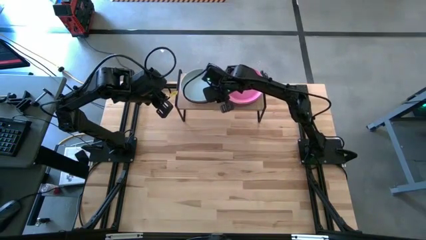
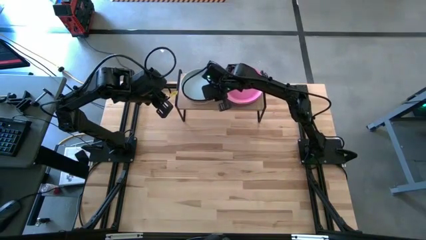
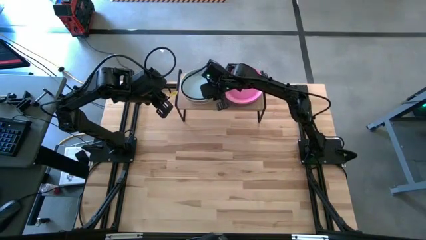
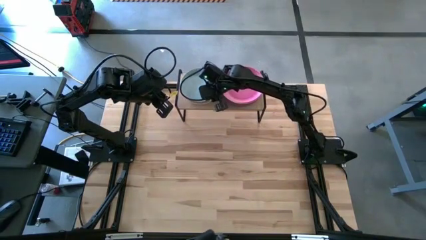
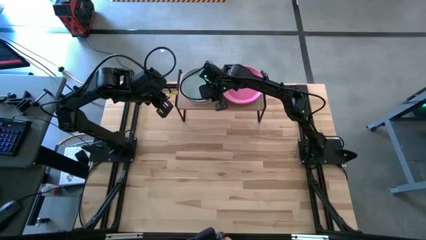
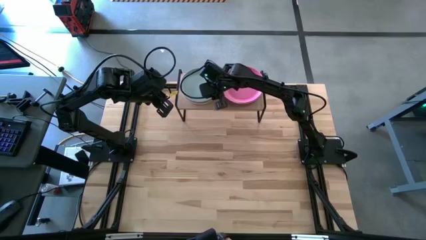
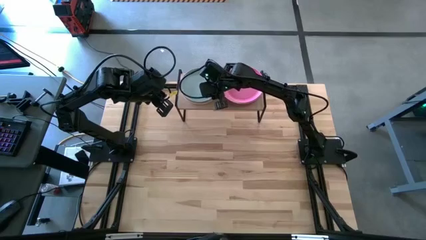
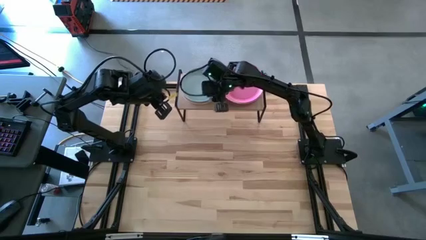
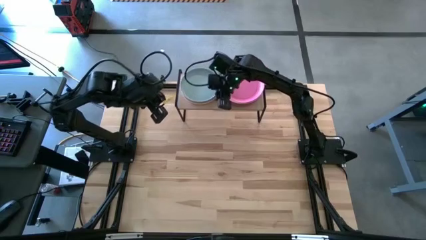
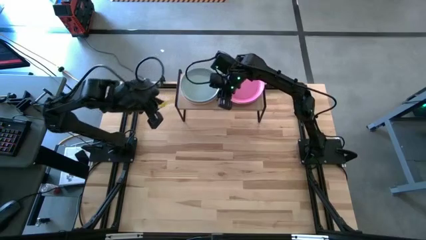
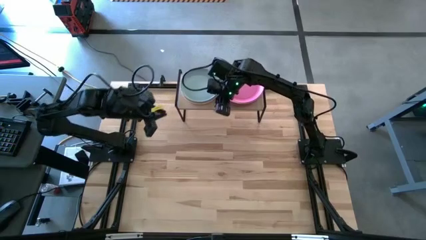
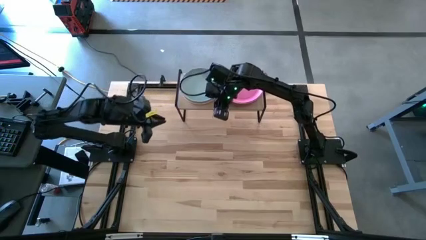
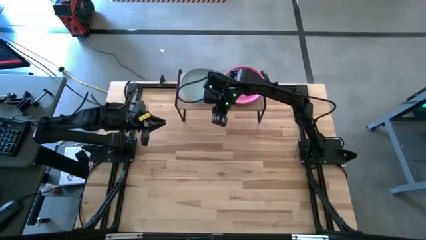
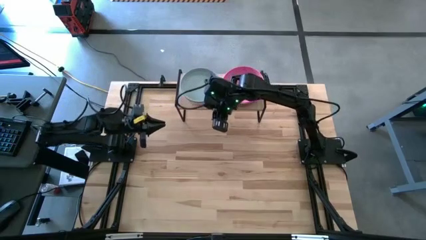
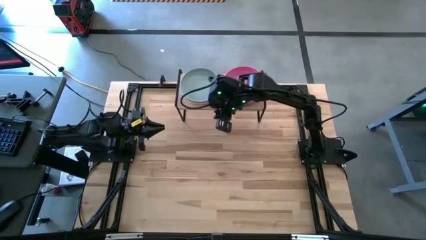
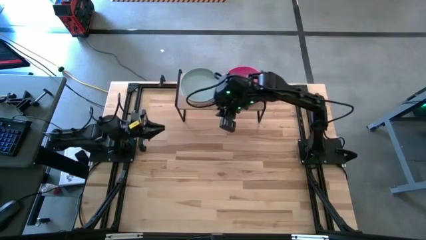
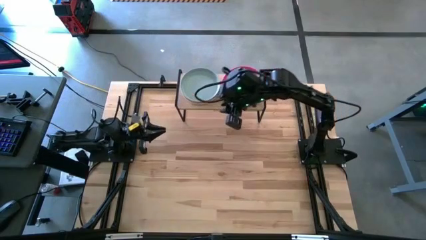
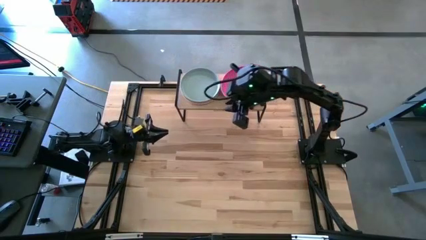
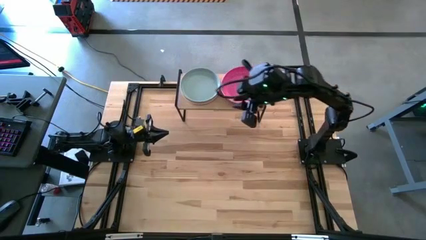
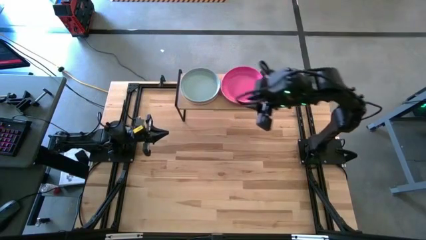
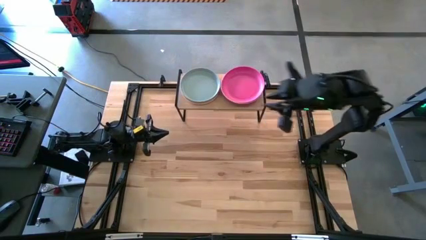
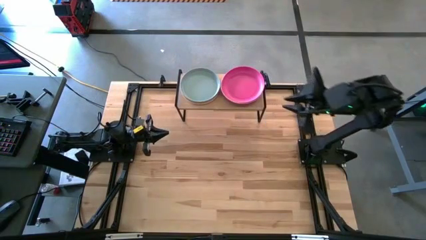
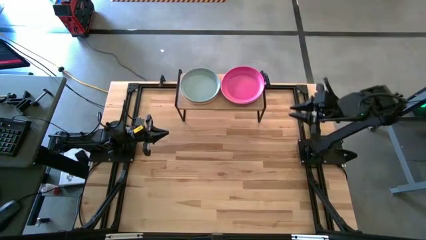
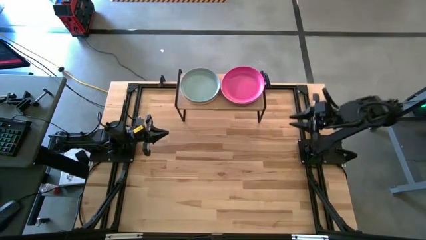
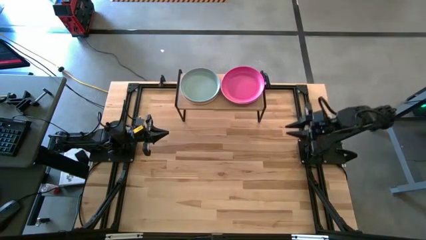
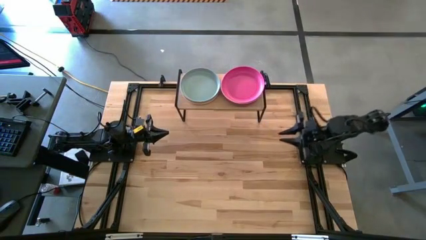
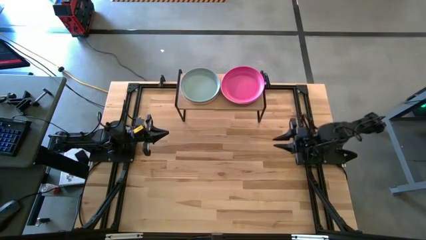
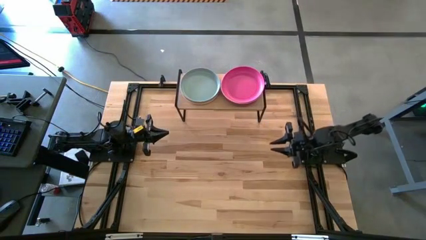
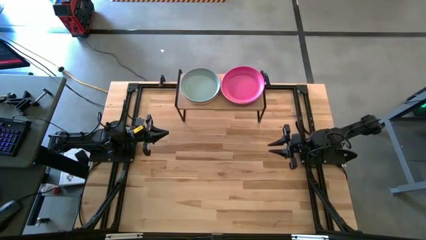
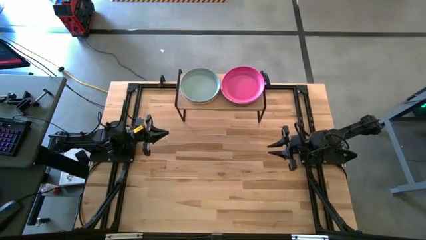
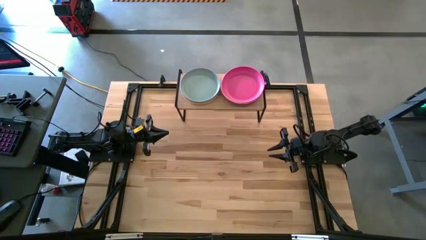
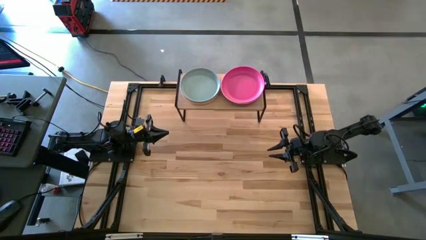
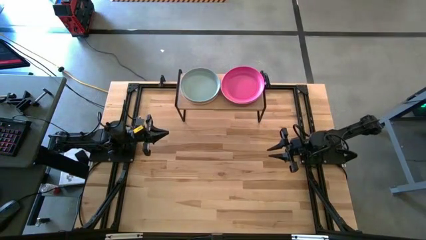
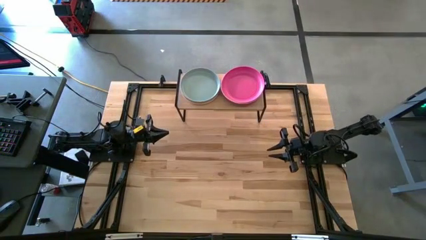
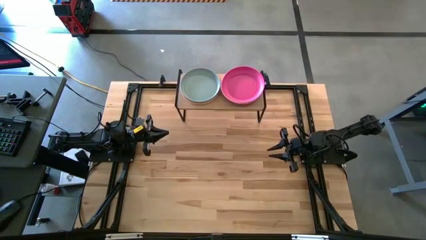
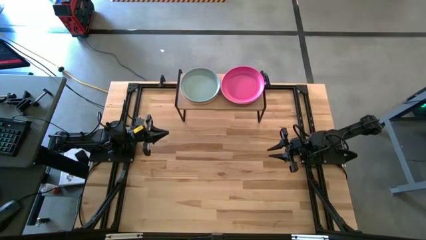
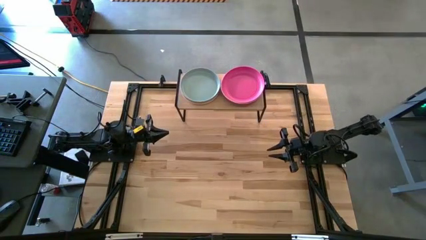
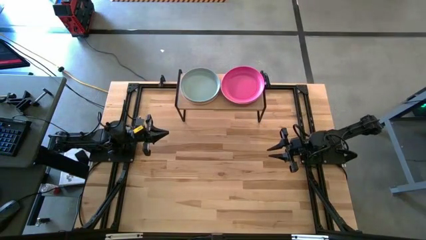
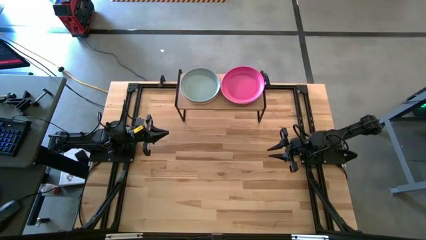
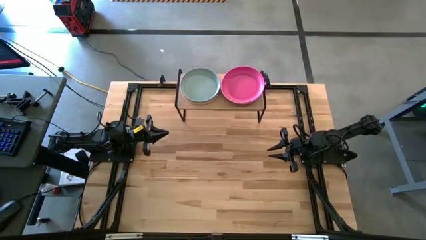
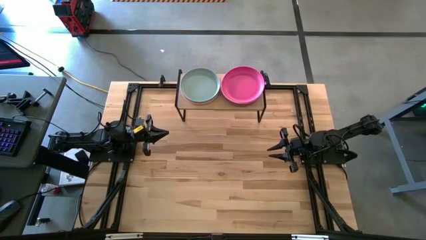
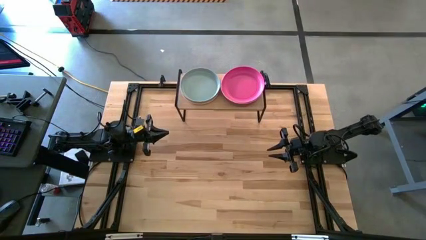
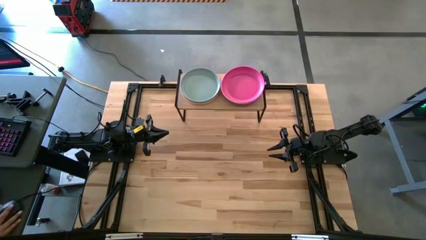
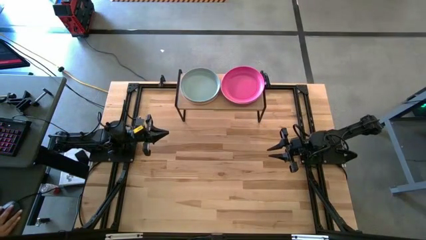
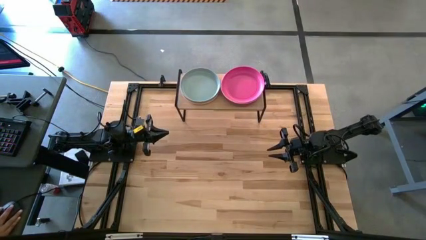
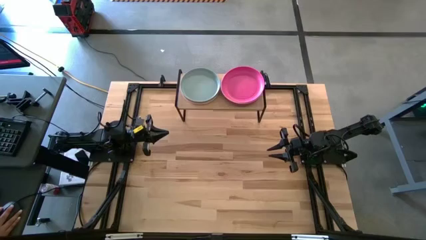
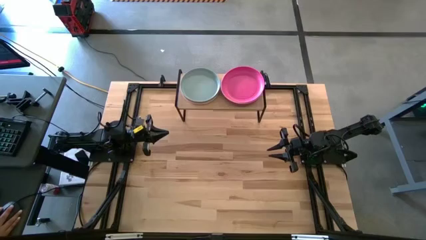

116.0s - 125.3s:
Task: Place and stack plates onto a shelf
Return to Home Position

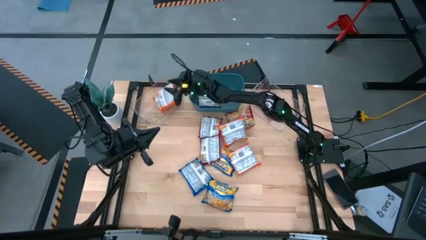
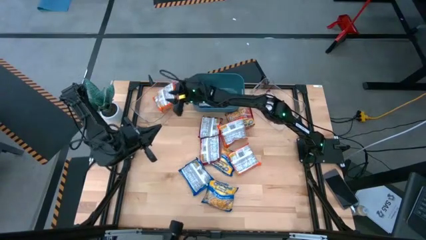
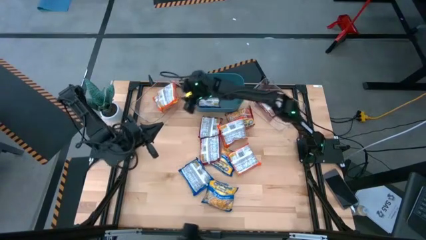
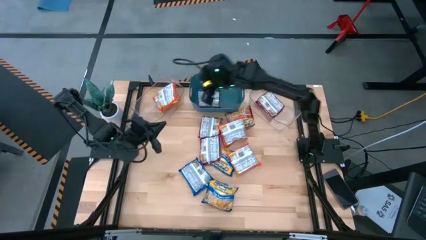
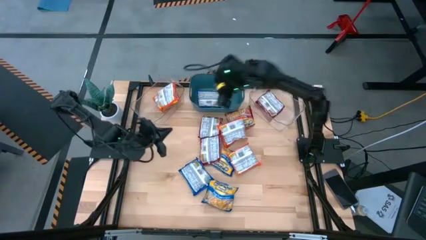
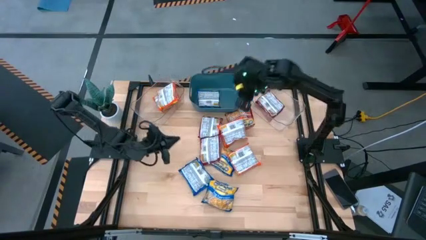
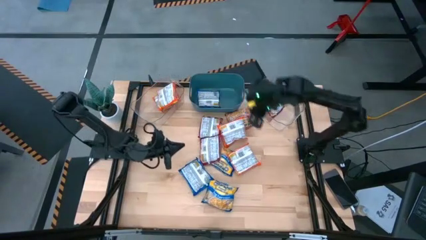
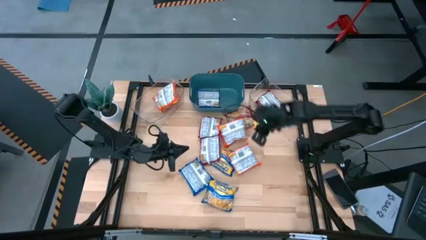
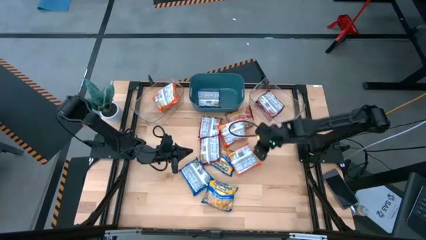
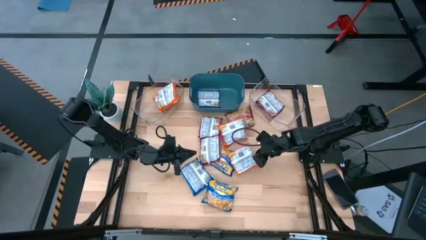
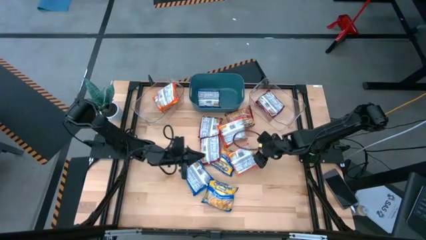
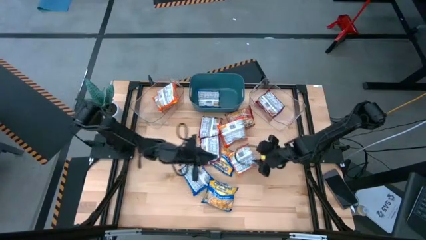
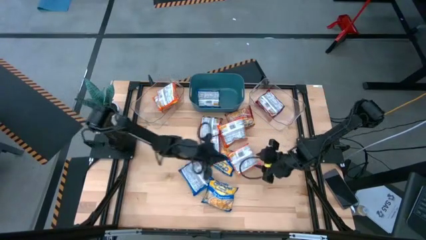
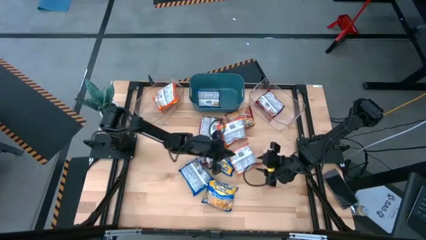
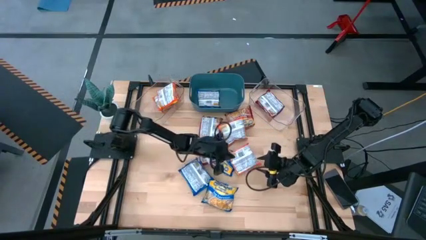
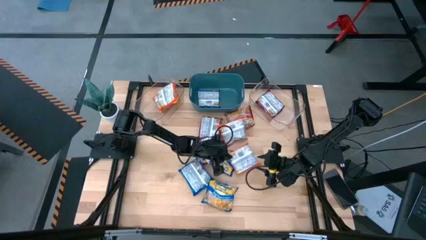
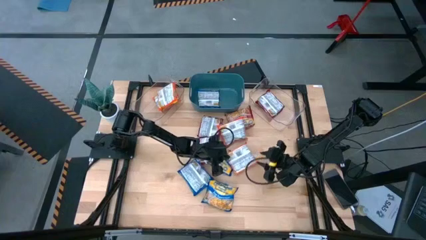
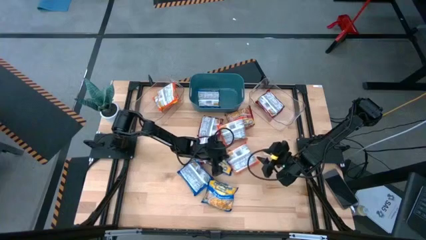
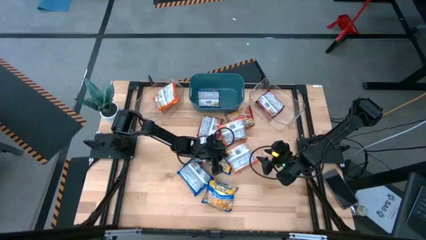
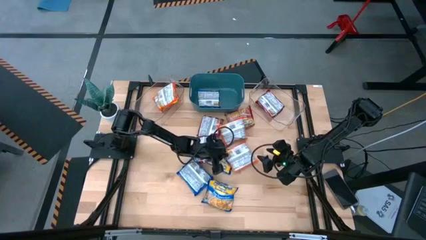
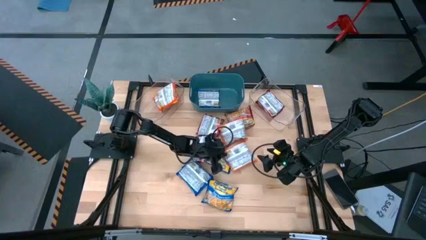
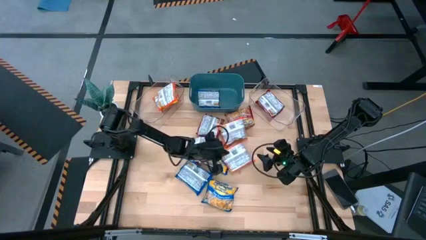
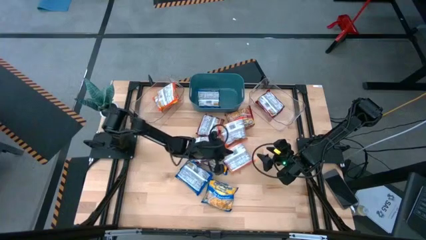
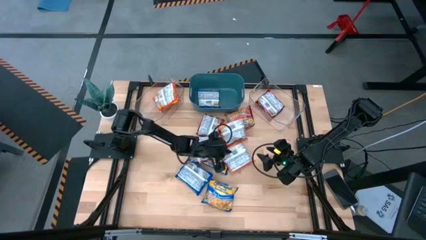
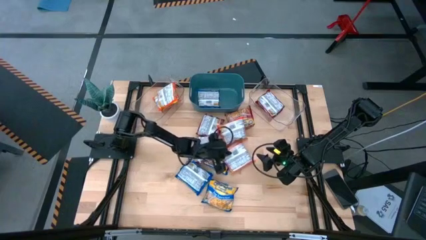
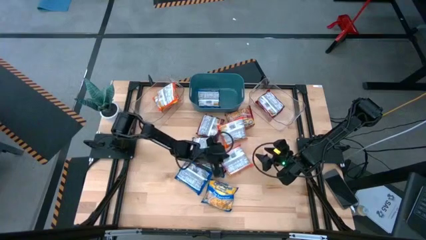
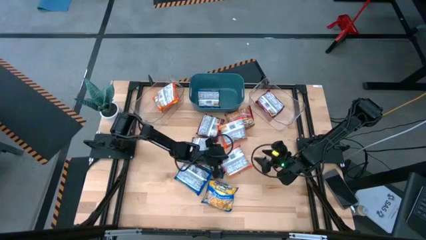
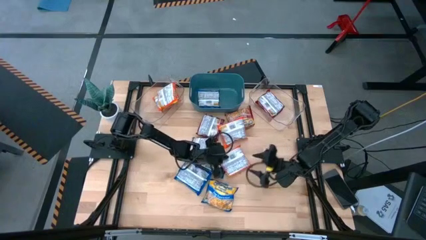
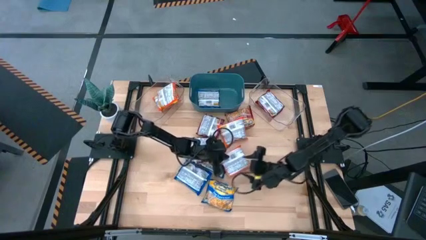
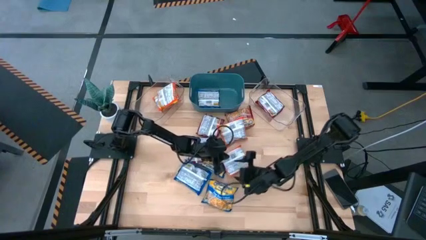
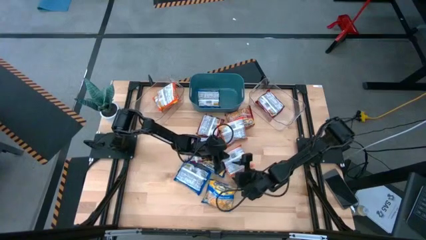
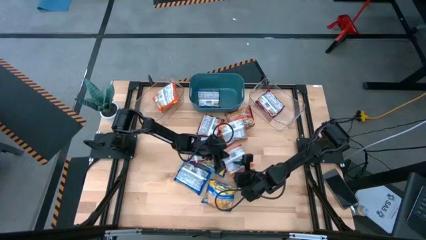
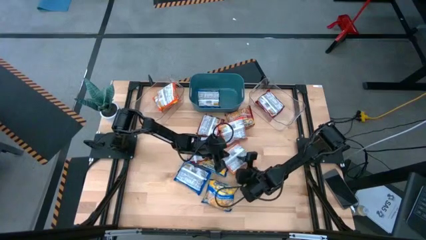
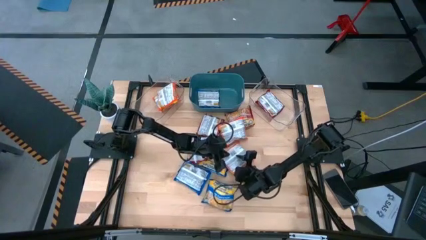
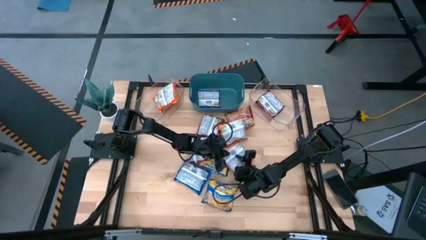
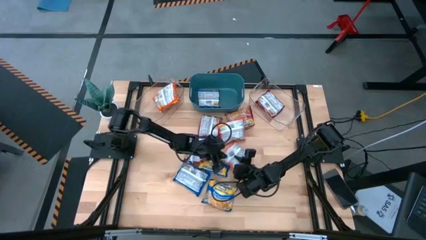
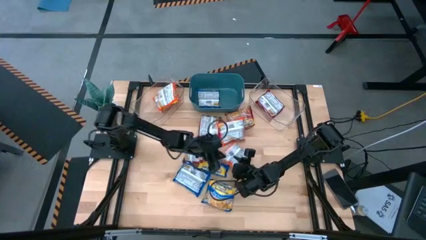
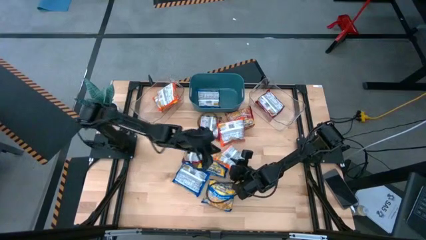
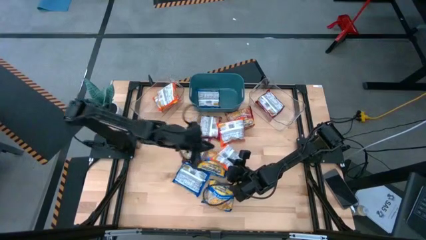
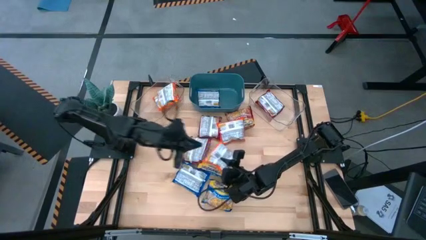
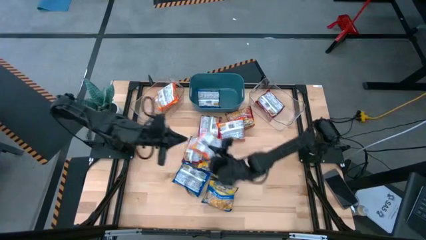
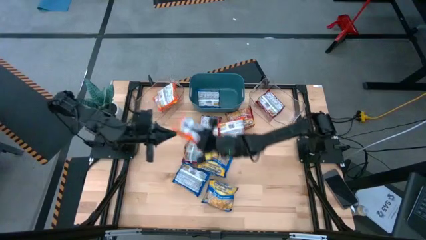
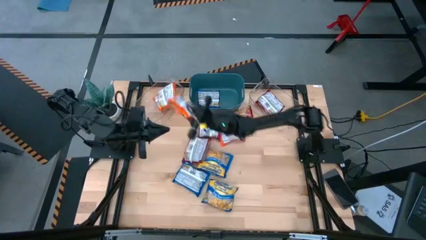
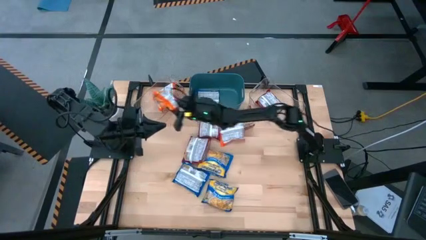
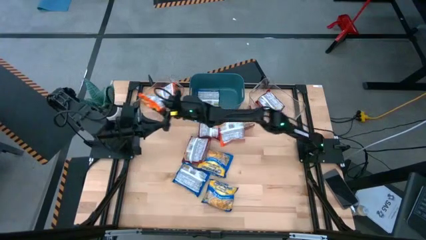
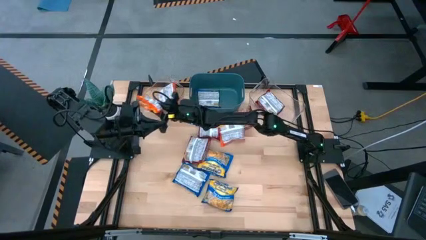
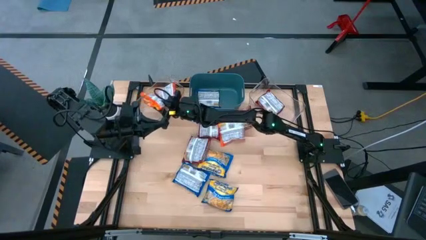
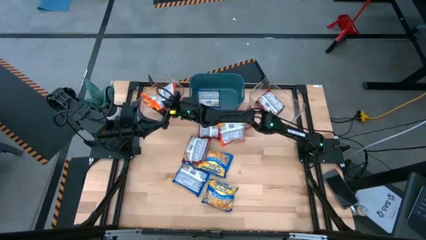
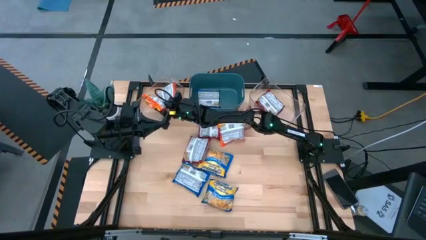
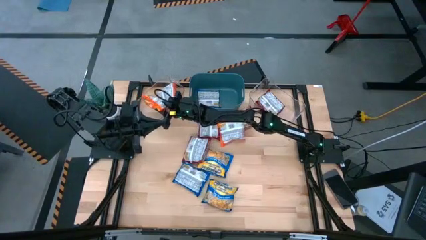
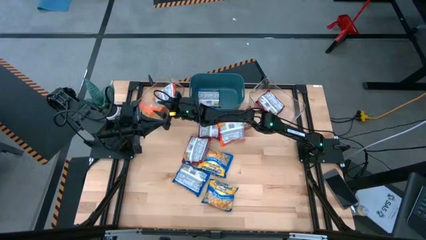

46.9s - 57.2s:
Task: Sort Maruchan noodles
Put the orange noodle pack into the left transparent bin
